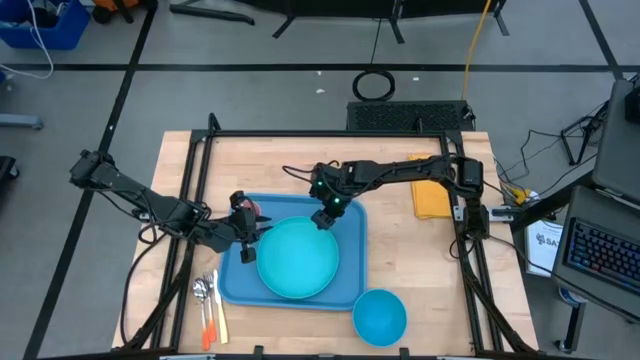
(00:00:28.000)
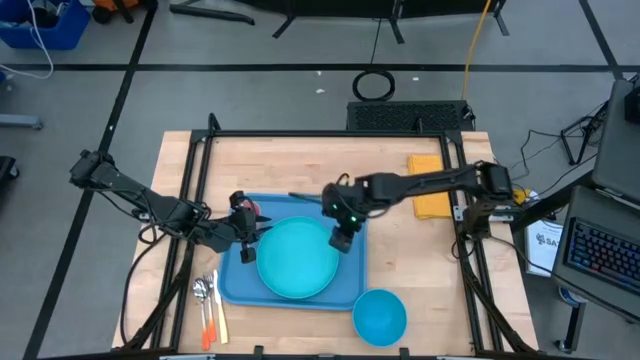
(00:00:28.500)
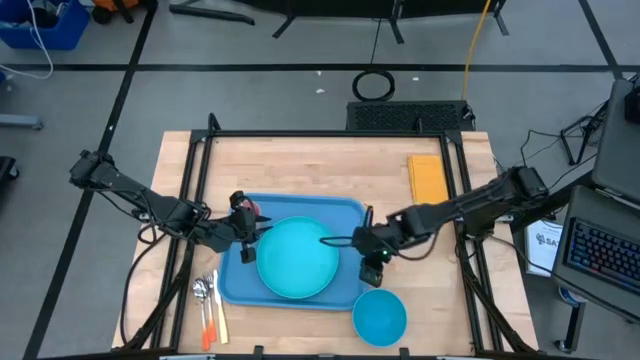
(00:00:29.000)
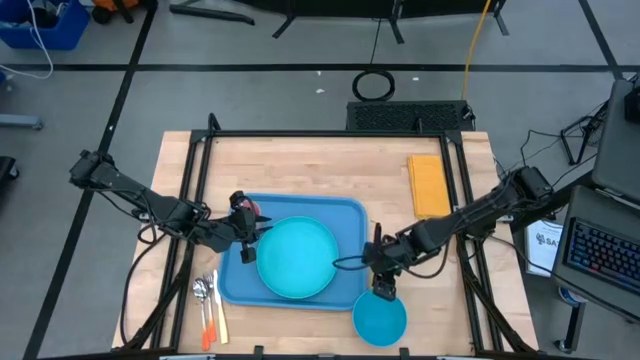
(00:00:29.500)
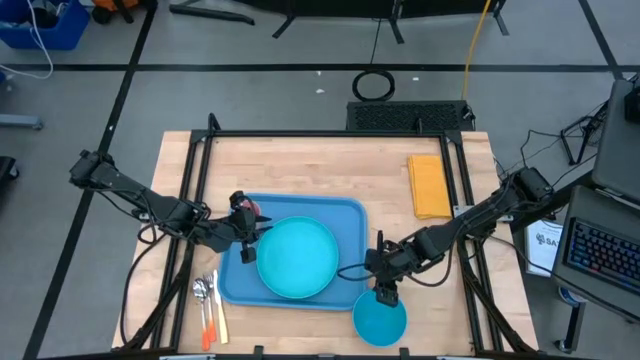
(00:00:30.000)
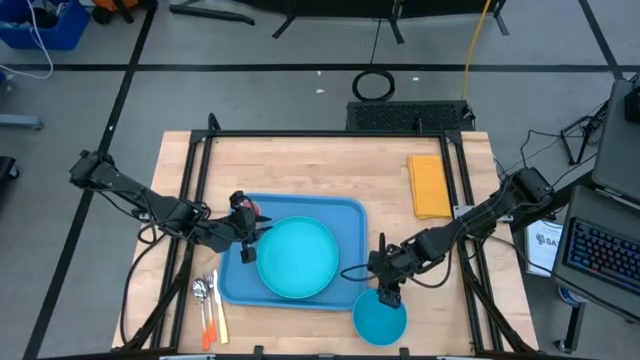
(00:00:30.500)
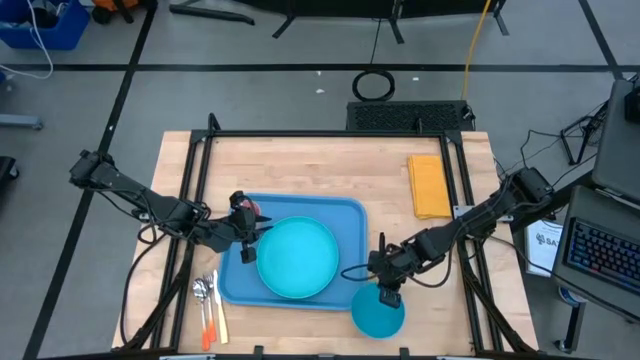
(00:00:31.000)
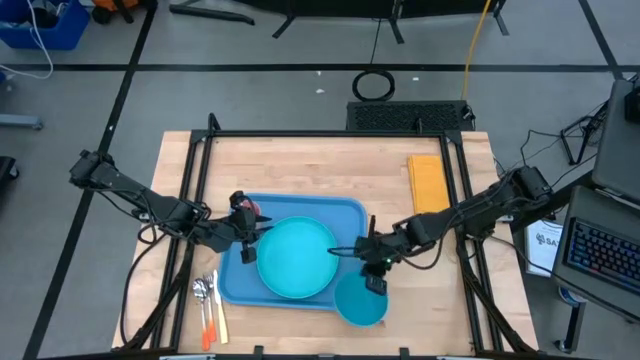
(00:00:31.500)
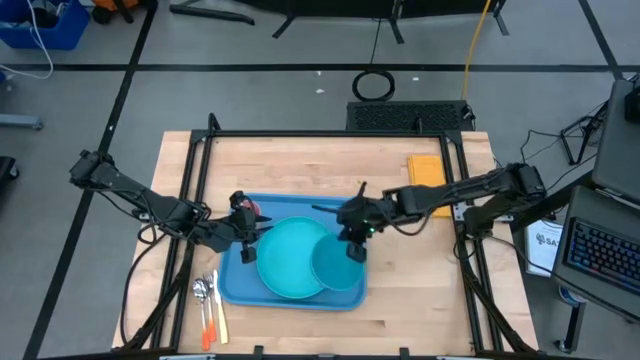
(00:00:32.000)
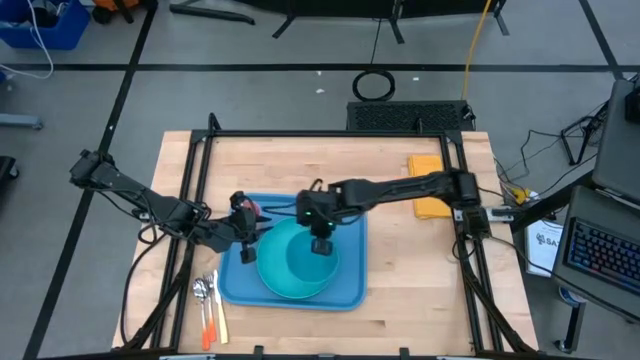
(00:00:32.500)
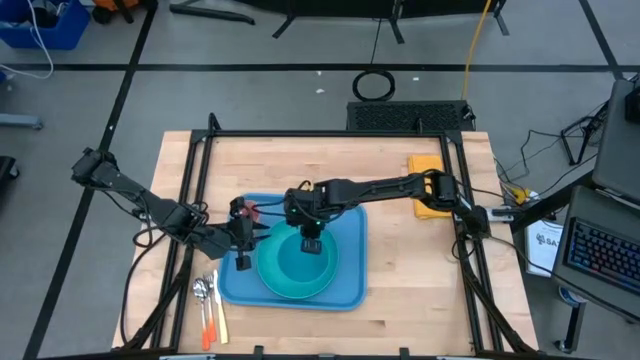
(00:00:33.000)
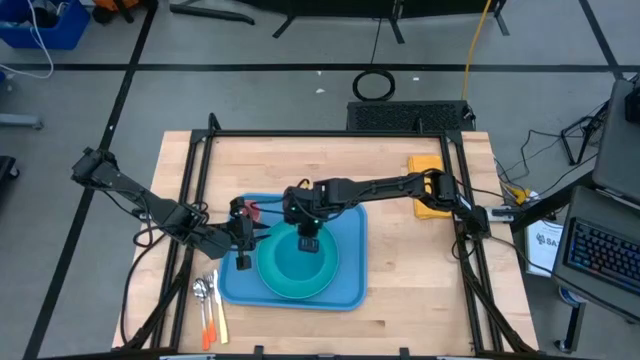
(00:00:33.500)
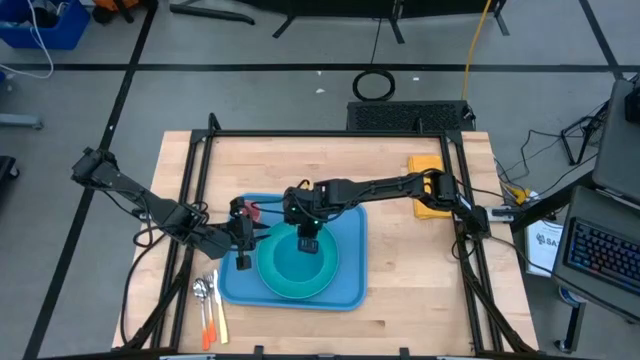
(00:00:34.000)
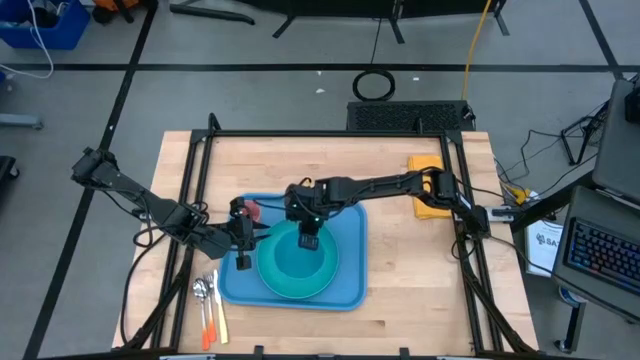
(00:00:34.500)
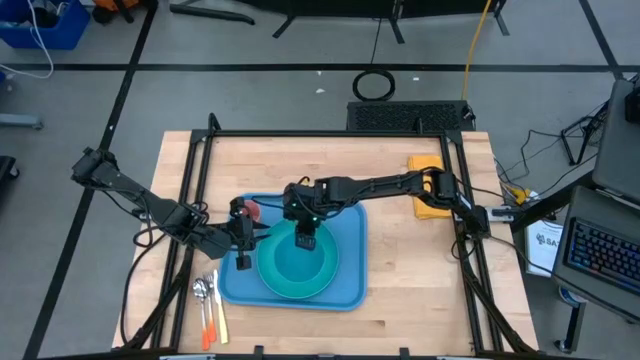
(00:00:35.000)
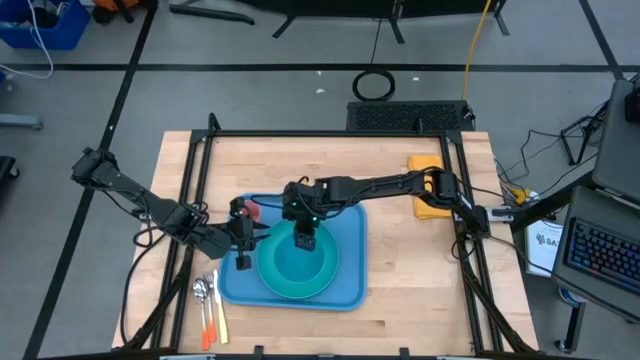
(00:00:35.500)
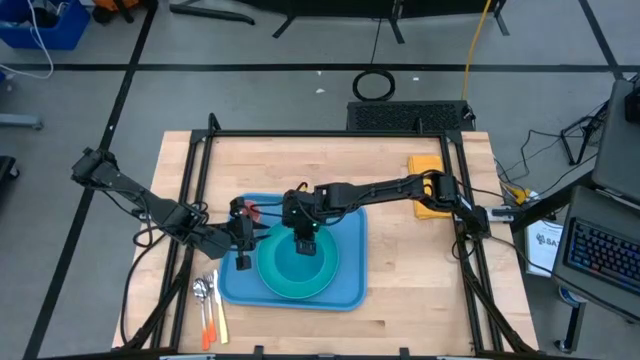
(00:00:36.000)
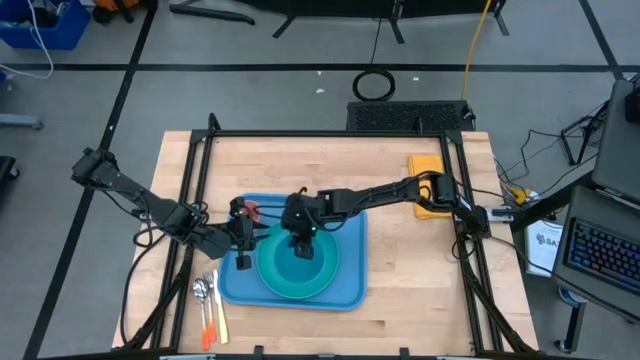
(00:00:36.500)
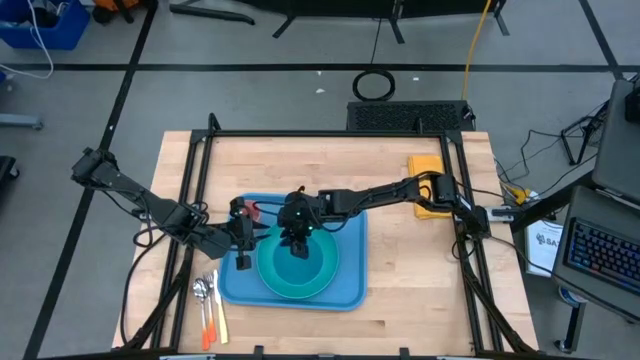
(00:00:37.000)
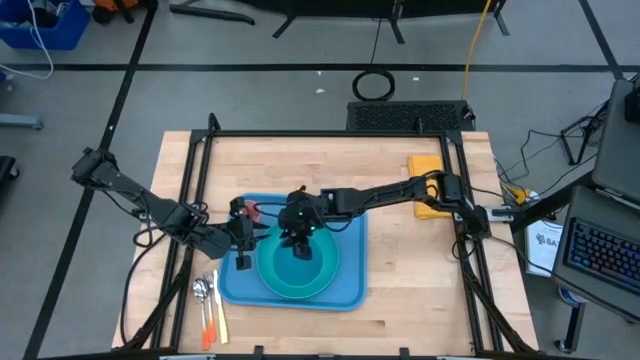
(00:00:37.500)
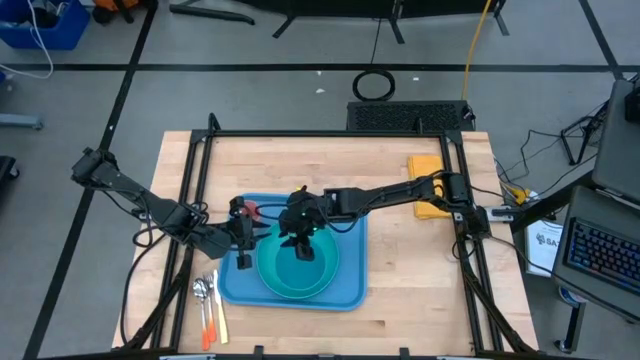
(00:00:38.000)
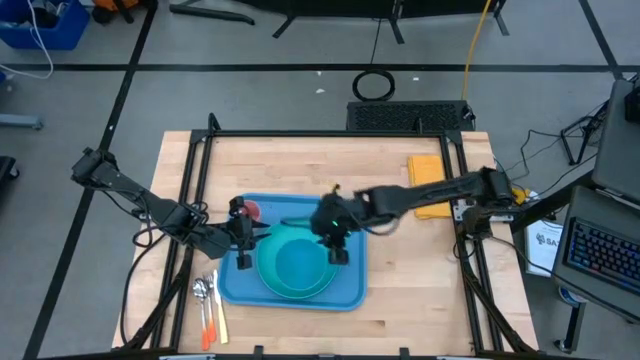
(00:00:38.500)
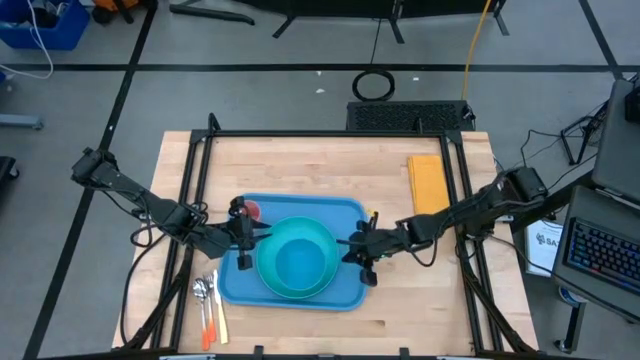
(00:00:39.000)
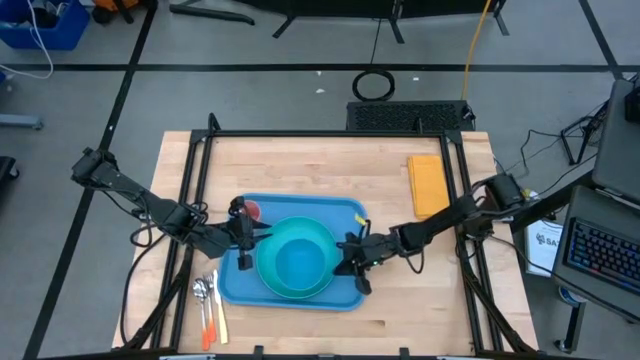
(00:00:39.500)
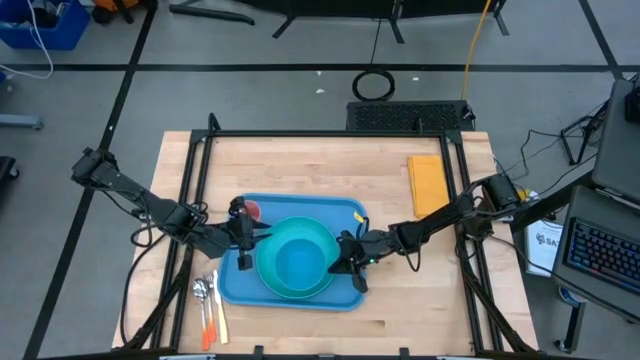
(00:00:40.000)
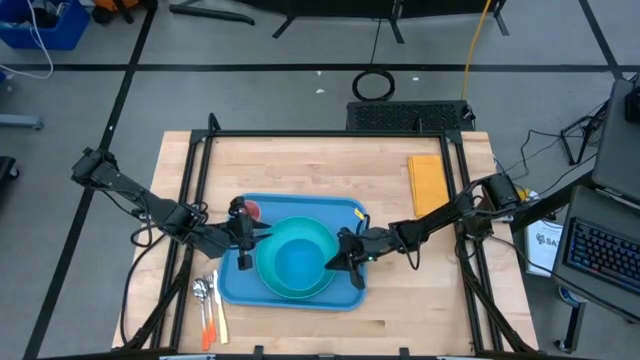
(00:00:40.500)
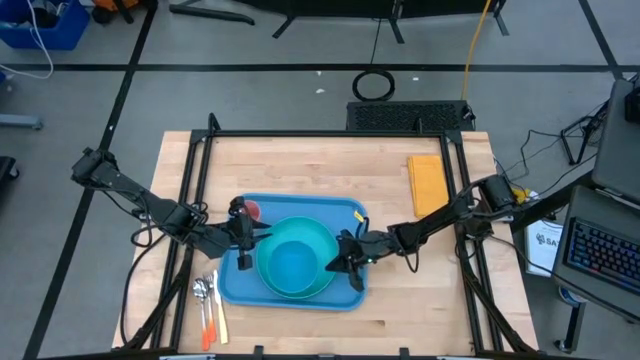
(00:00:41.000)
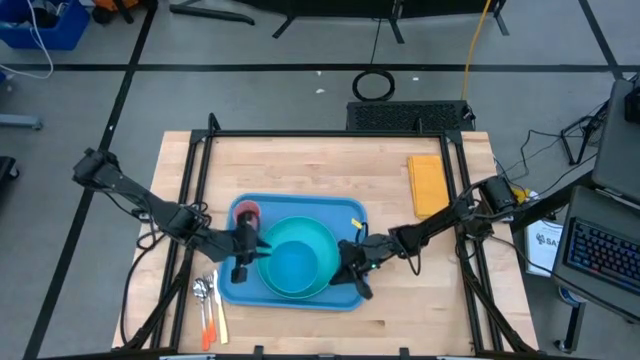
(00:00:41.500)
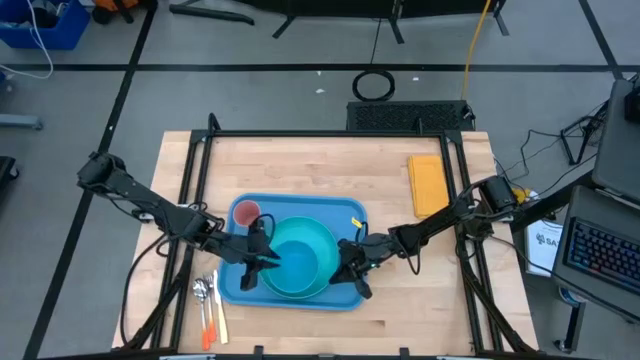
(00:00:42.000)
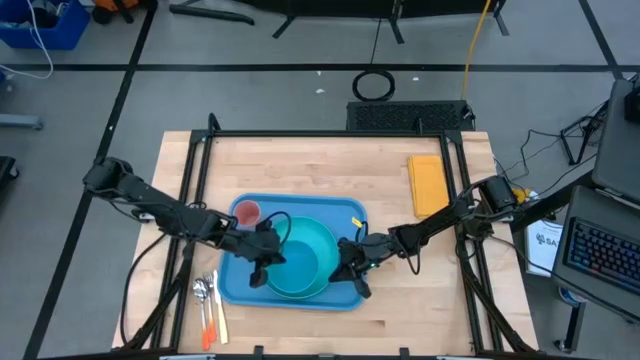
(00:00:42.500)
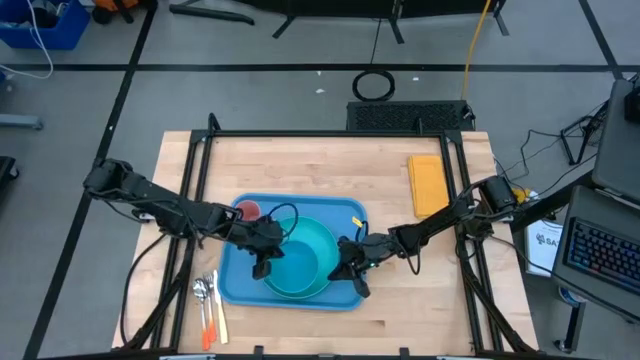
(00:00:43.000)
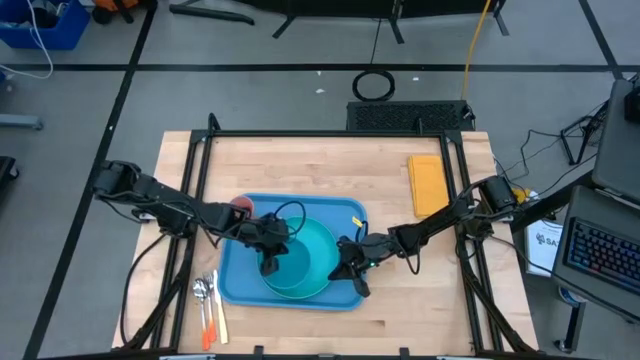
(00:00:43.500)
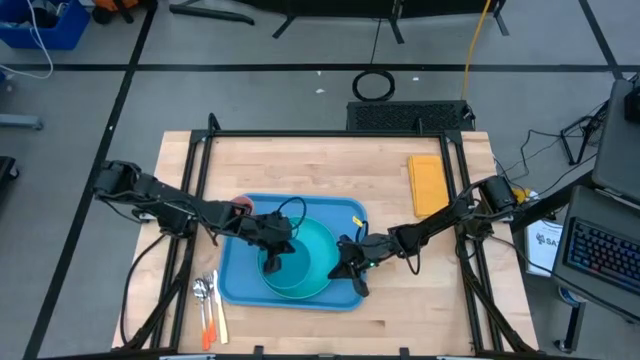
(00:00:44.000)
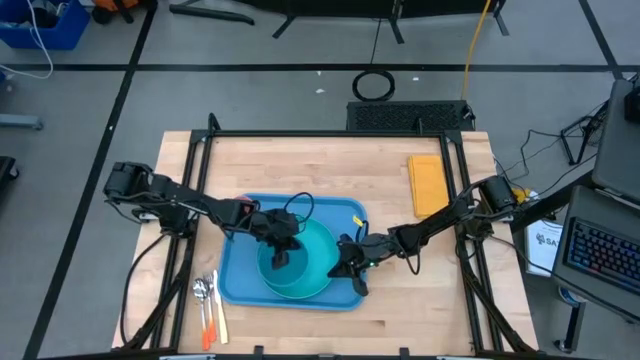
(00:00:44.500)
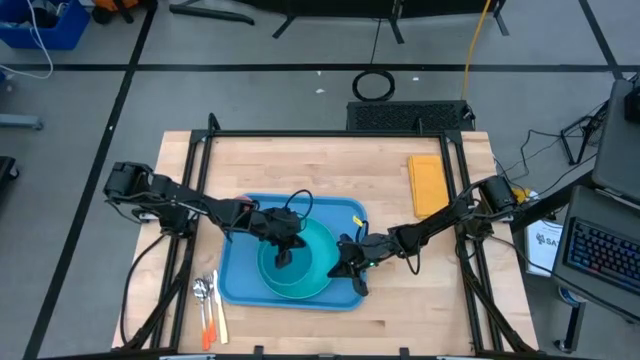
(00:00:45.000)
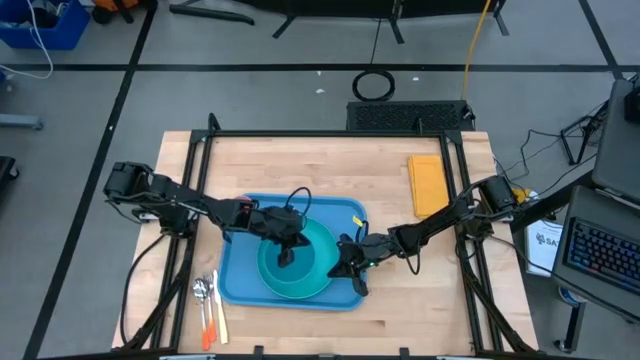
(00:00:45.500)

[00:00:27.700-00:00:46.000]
Task: Set up tray
Put the blue bowl on the light blue plate on the blue serving tray

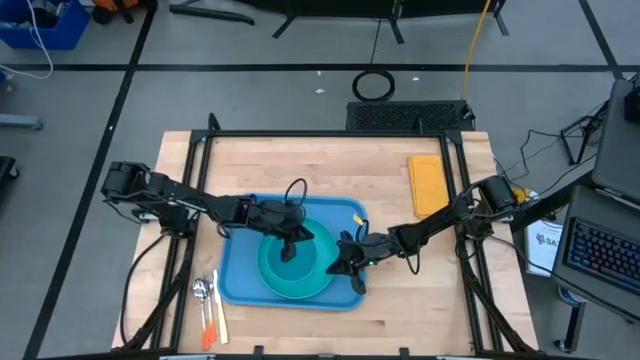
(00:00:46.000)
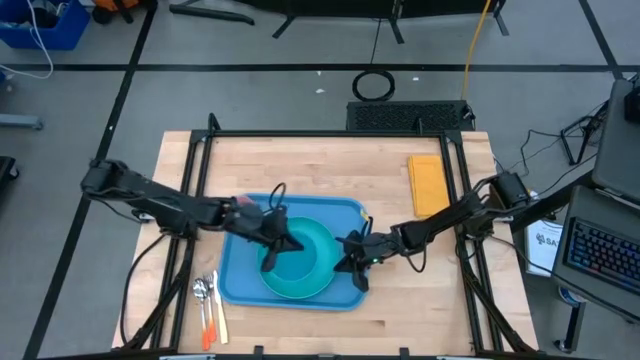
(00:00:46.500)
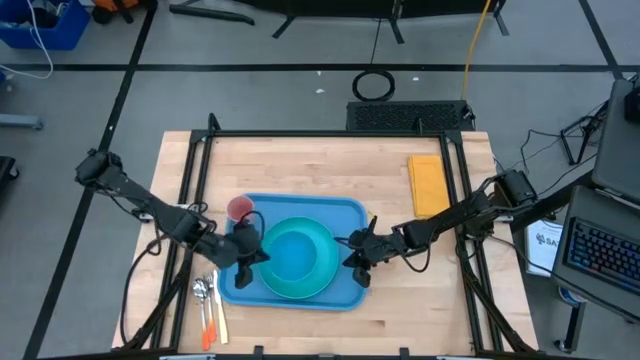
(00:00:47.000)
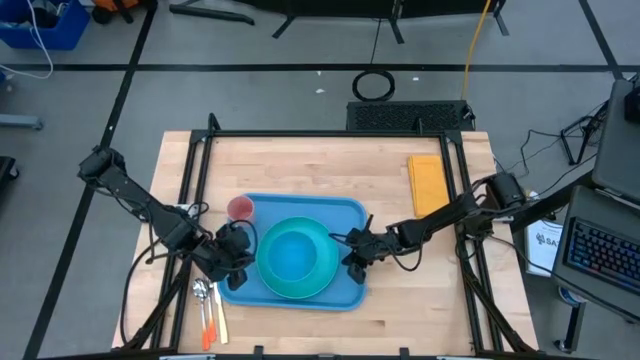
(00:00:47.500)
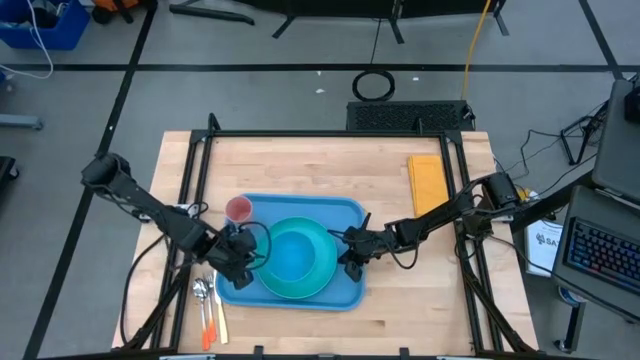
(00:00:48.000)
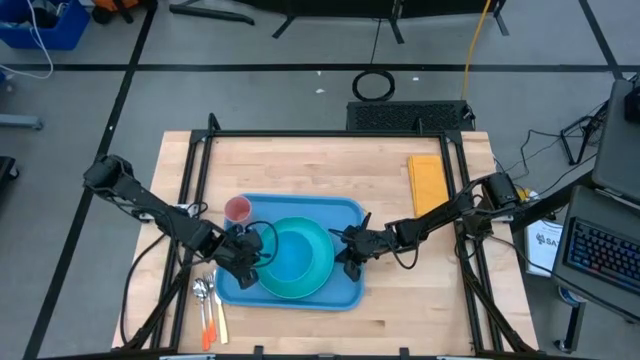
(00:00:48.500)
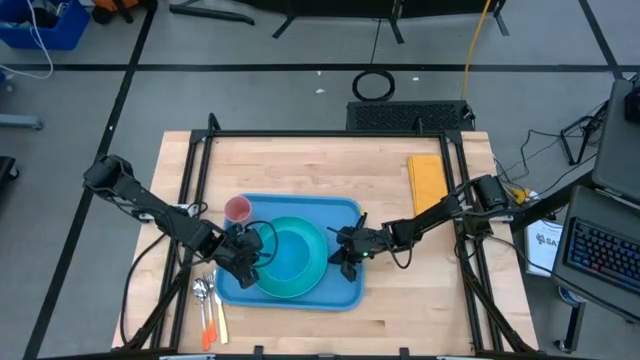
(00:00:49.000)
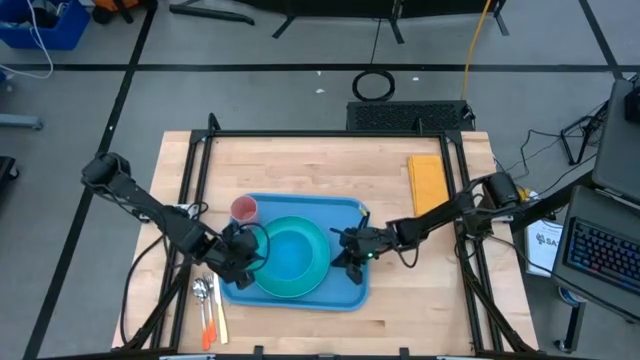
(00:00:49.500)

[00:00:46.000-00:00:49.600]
Adjust the light blue plate on the blue serving tray
